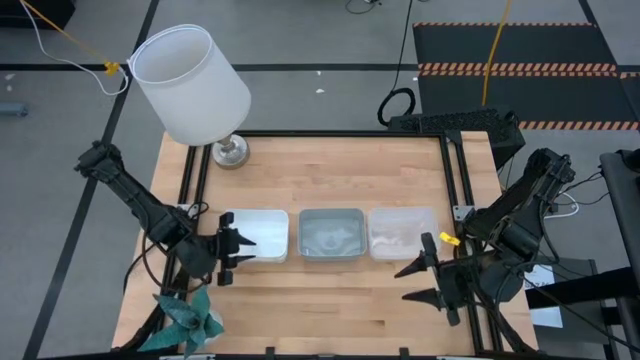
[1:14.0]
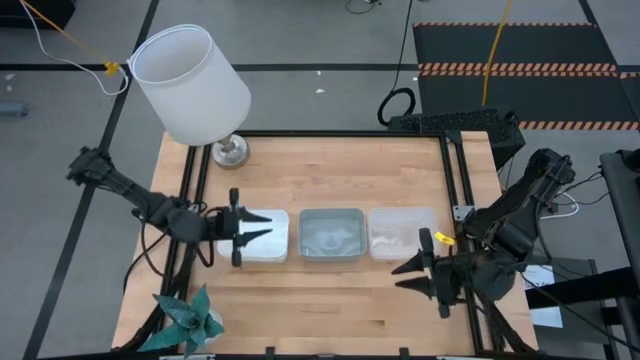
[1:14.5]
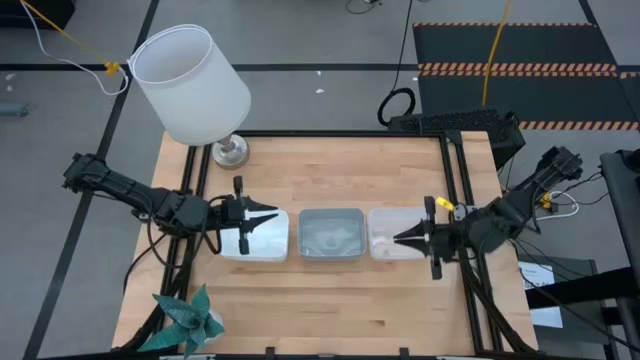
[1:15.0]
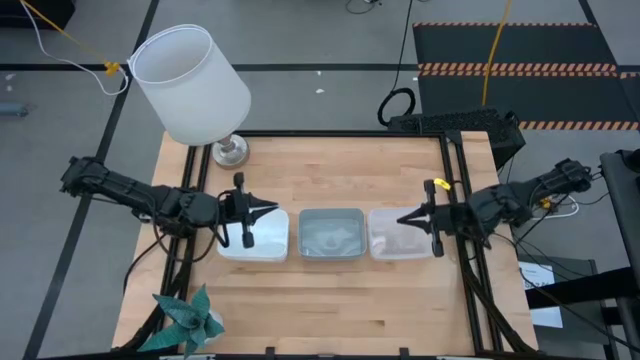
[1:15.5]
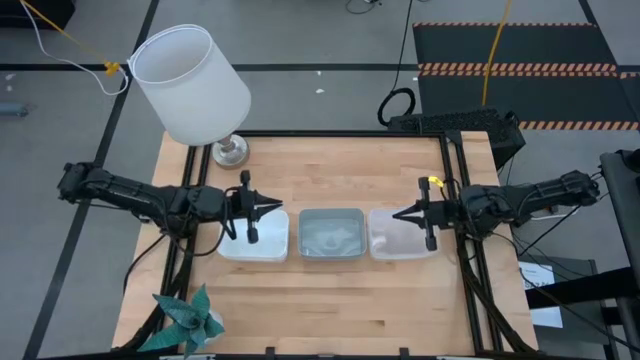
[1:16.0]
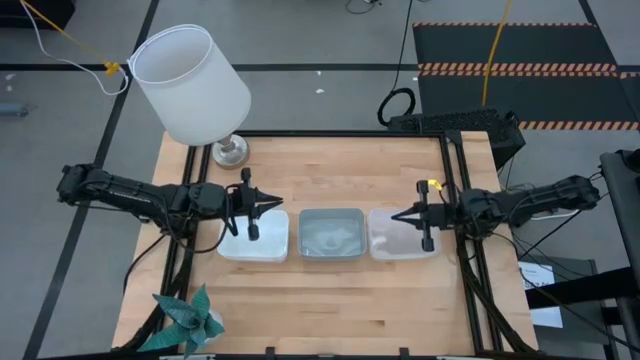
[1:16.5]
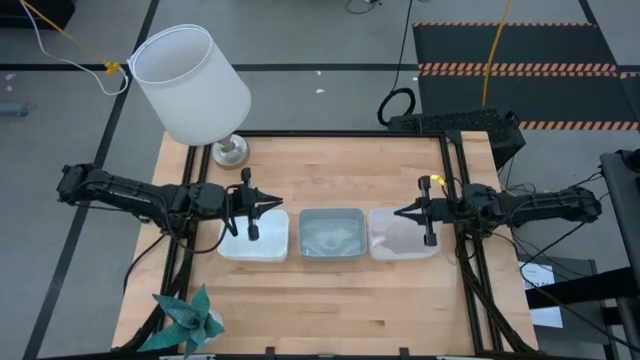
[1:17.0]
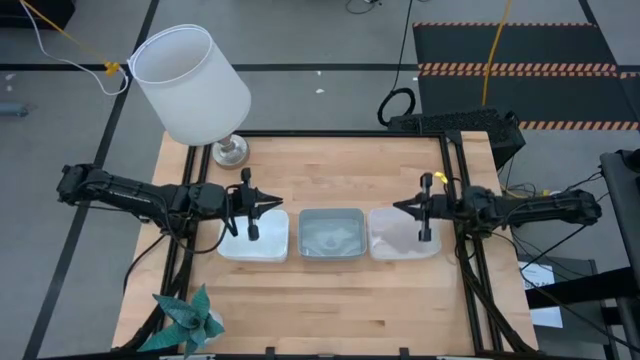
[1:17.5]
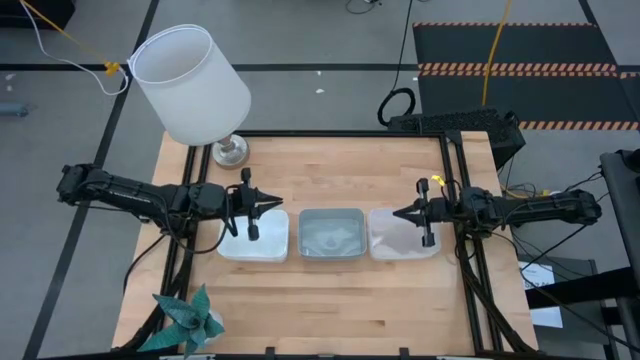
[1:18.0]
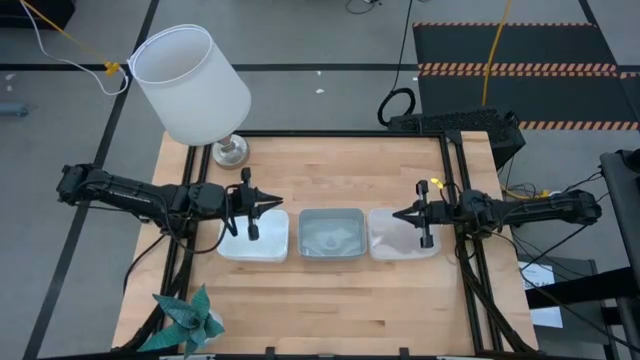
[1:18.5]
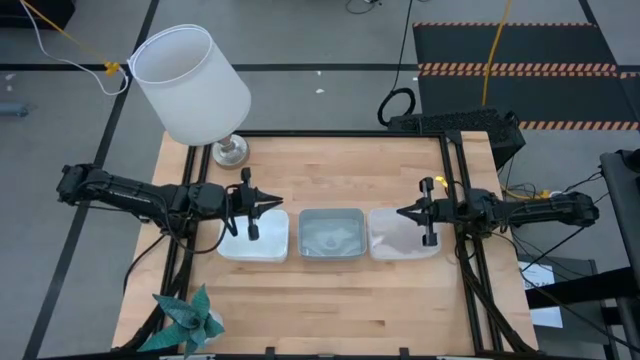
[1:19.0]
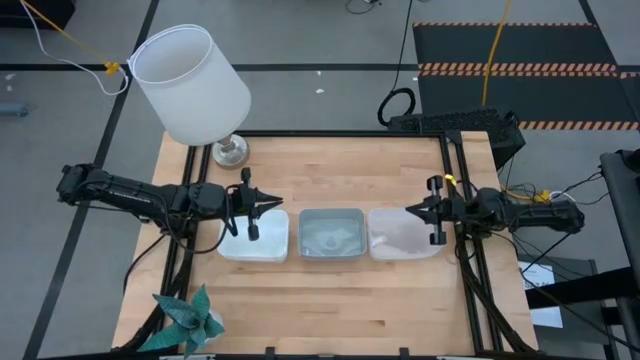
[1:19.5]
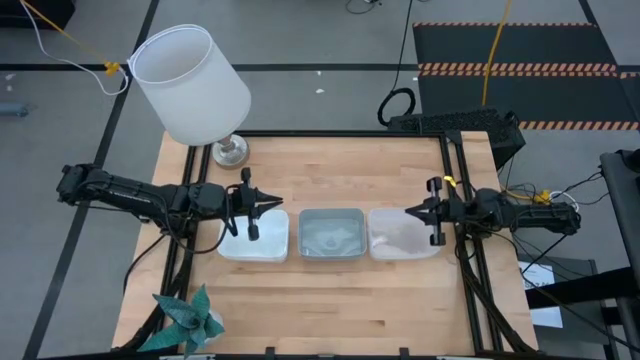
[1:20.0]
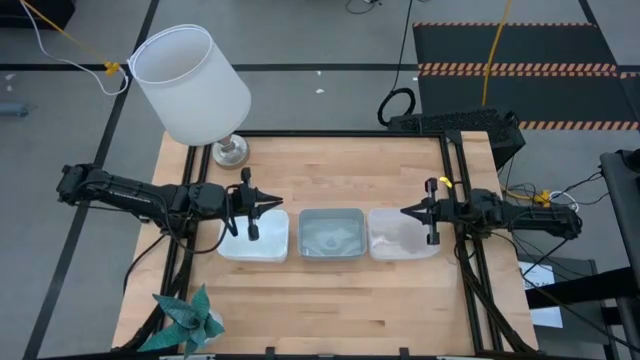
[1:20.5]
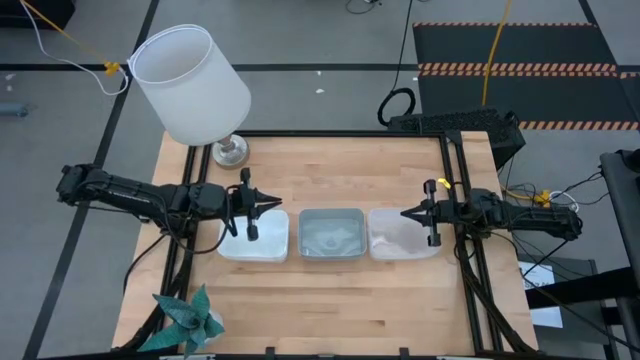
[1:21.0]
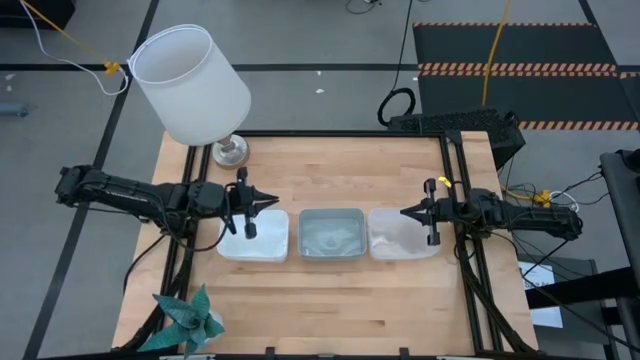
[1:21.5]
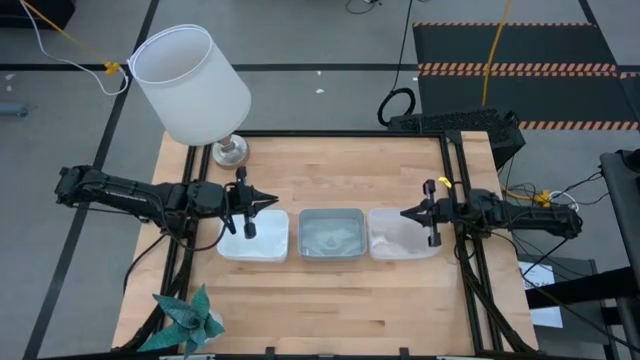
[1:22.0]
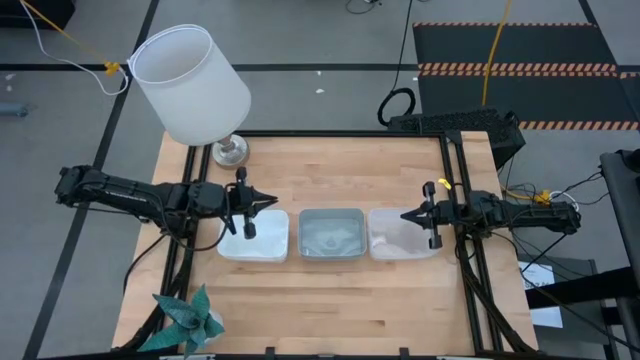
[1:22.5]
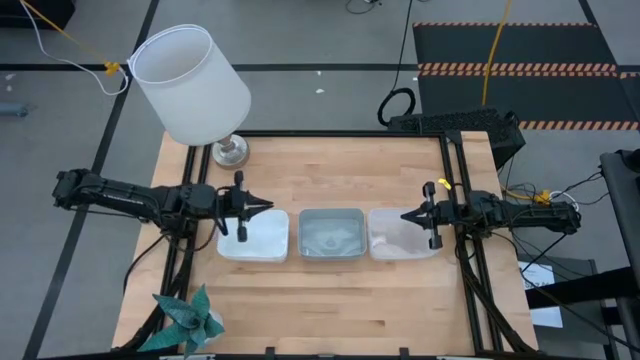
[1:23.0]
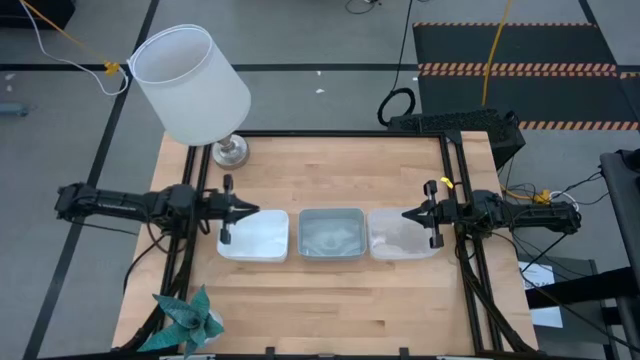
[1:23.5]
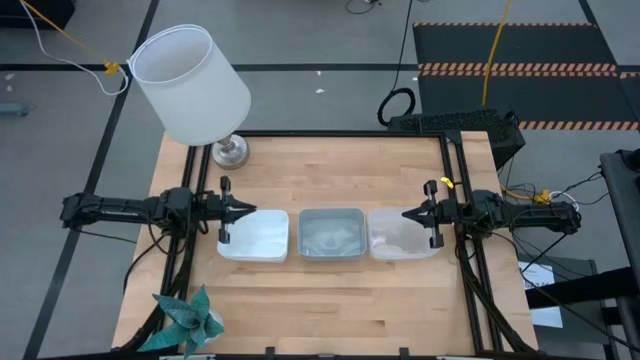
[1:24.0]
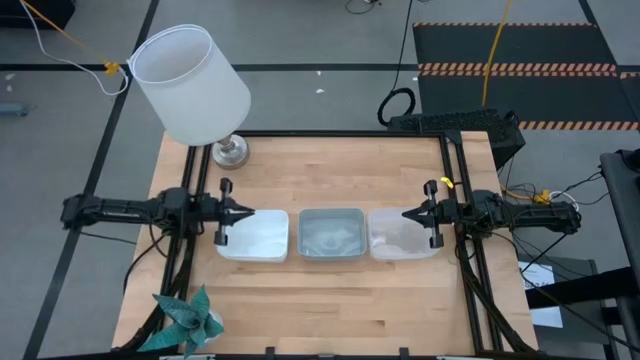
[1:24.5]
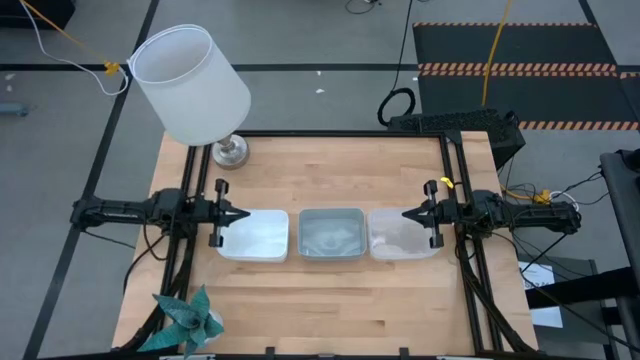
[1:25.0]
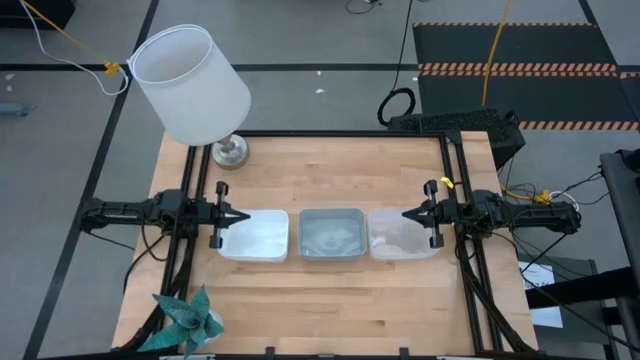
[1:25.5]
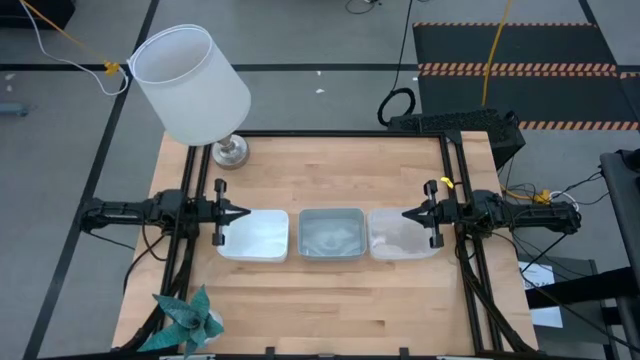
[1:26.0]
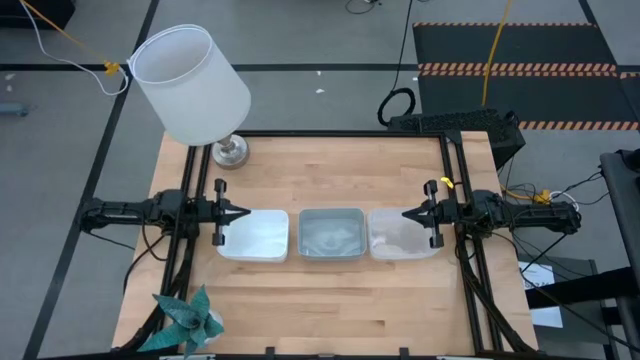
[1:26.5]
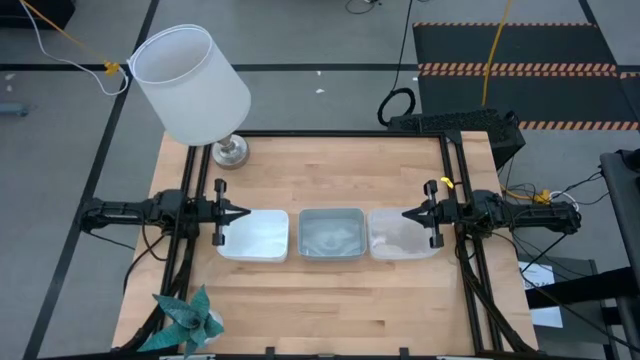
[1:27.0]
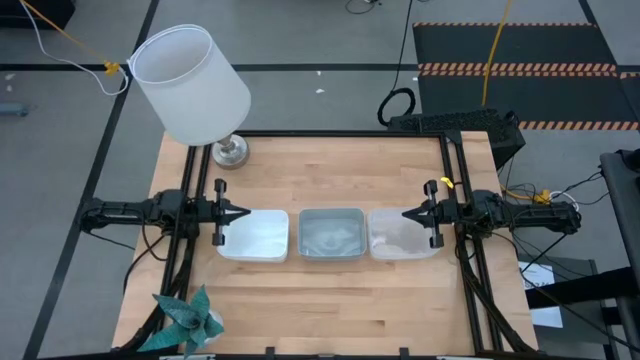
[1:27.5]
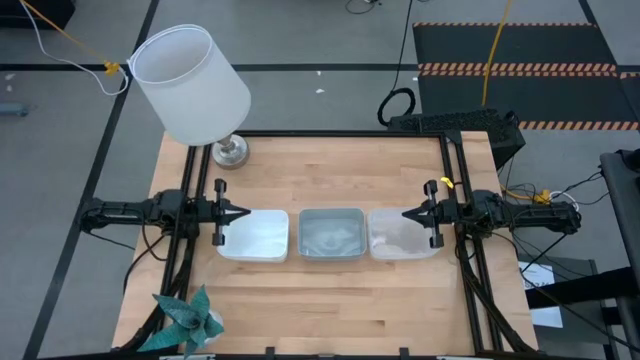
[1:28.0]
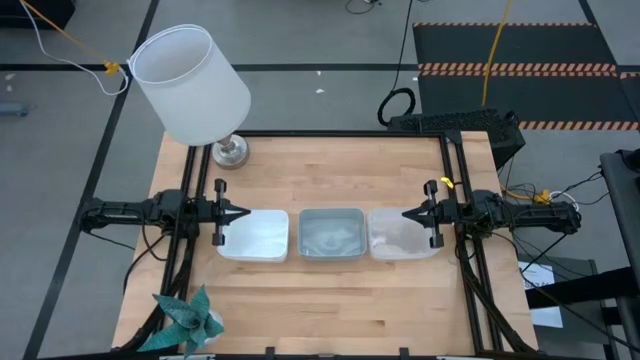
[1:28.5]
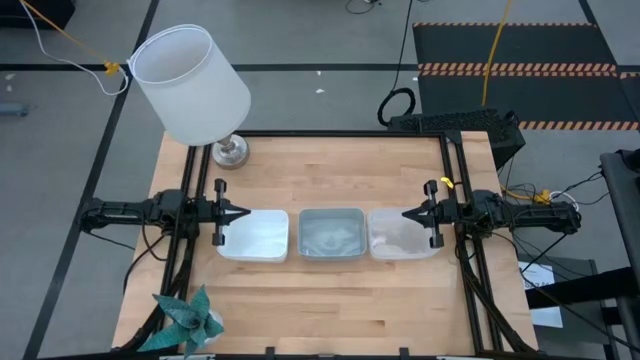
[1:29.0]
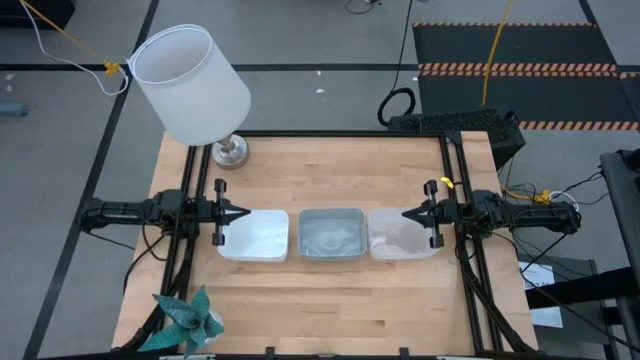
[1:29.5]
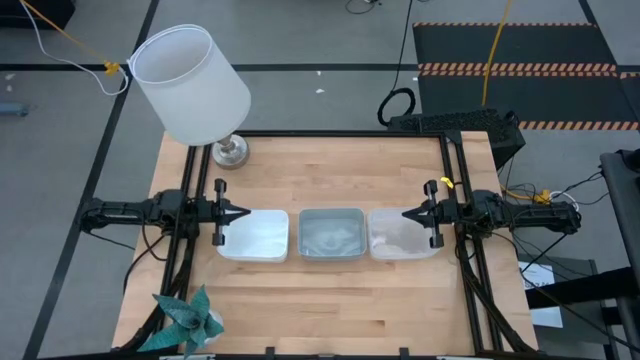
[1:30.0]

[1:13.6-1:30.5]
Return to Home Position

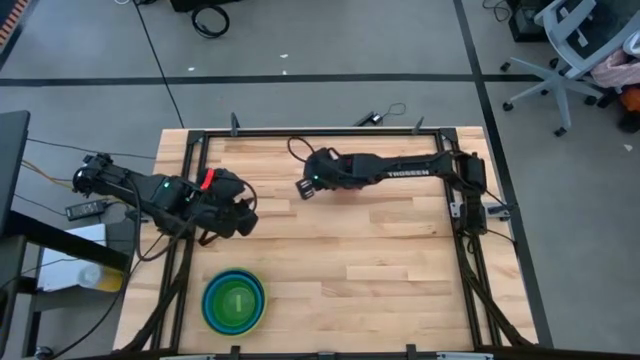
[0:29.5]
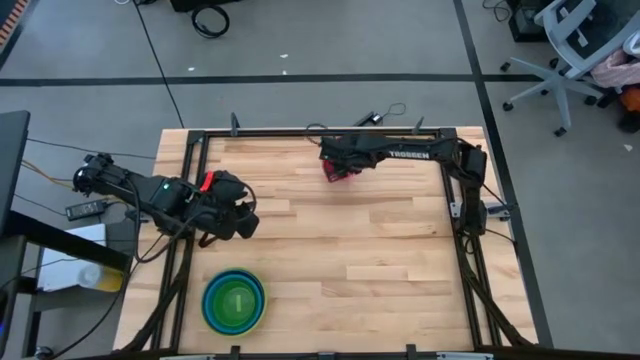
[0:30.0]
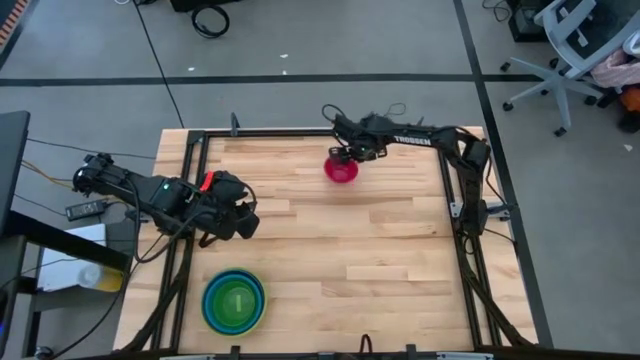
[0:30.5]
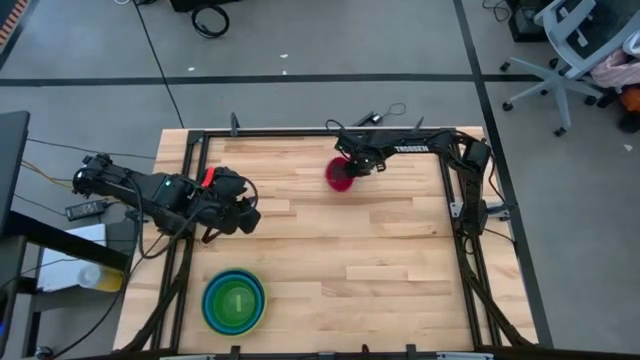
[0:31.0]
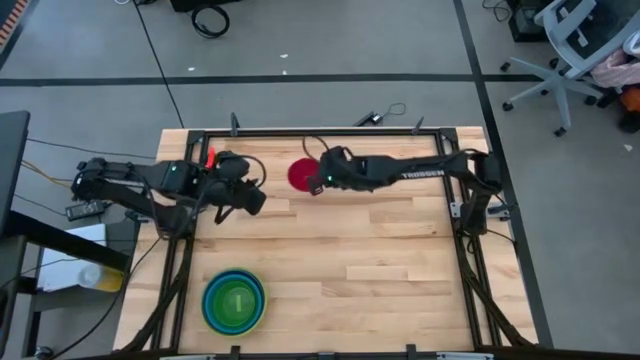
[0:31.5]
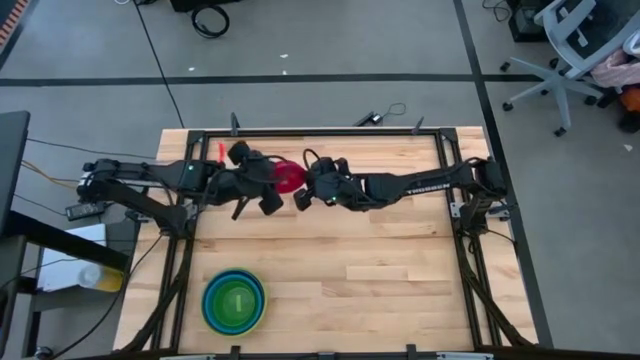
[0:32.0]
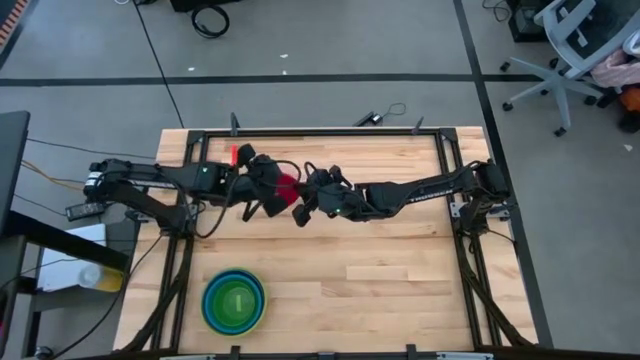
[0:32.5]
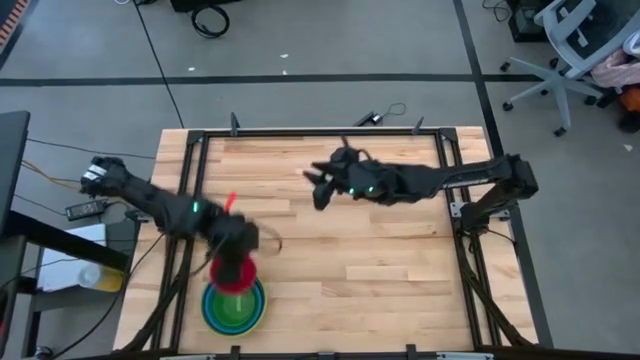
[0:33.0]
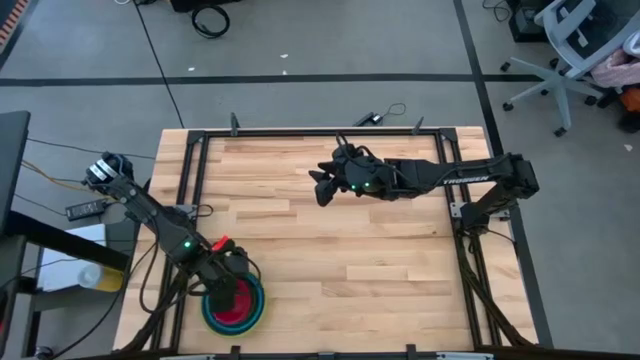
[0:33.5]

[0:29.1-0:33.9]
Stack the red bowl on top of the green bowl
